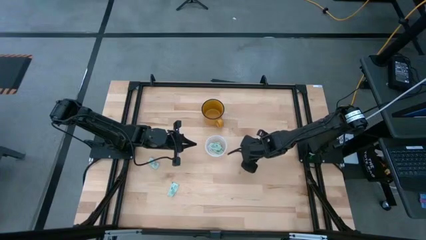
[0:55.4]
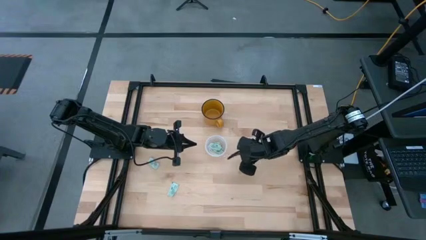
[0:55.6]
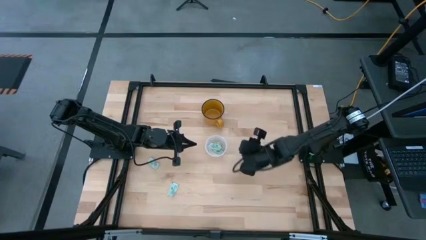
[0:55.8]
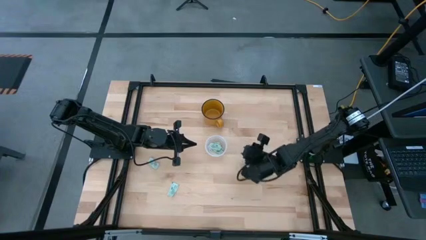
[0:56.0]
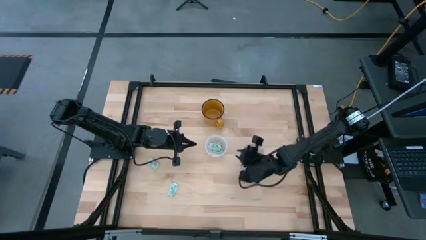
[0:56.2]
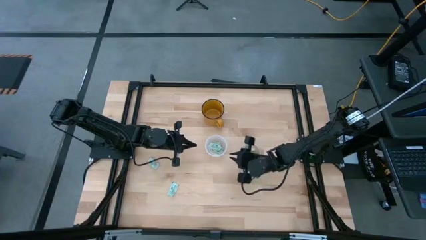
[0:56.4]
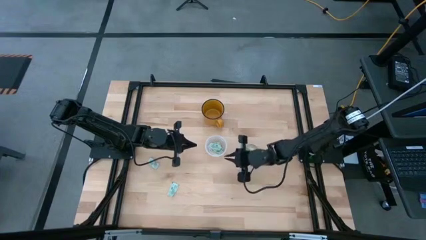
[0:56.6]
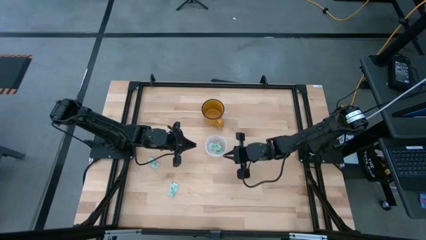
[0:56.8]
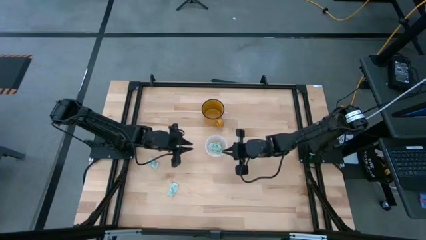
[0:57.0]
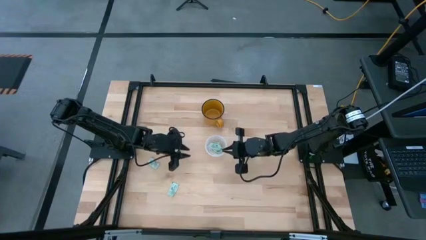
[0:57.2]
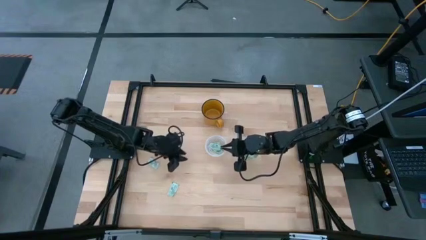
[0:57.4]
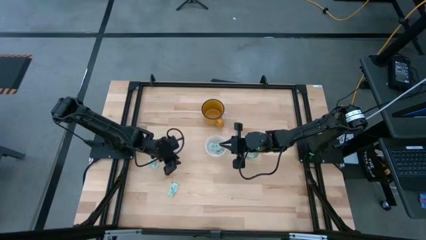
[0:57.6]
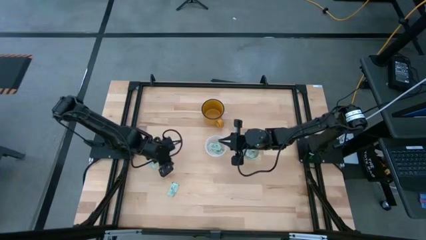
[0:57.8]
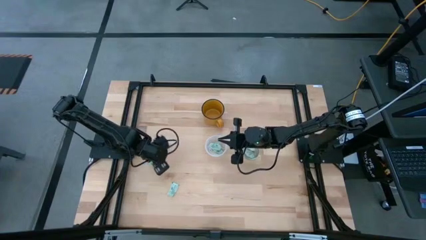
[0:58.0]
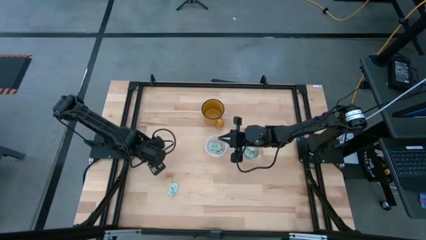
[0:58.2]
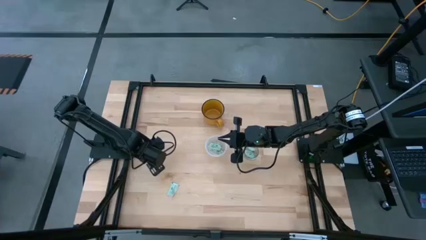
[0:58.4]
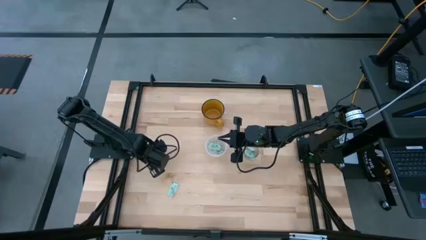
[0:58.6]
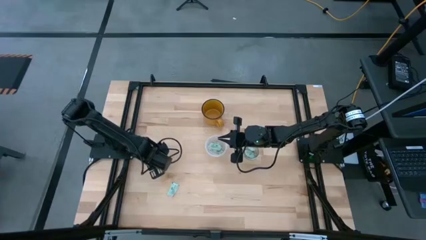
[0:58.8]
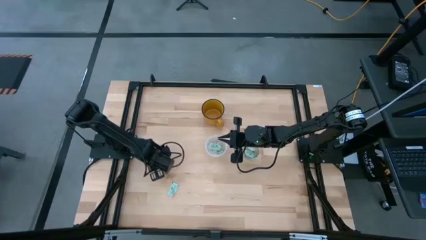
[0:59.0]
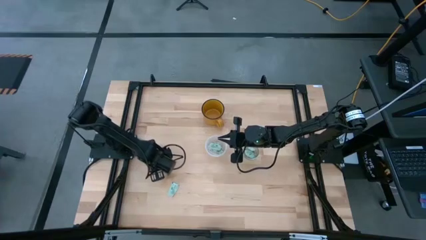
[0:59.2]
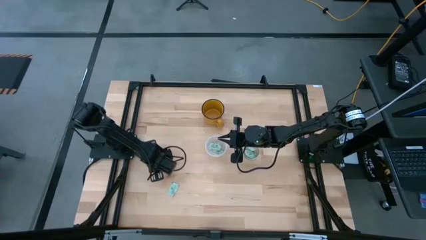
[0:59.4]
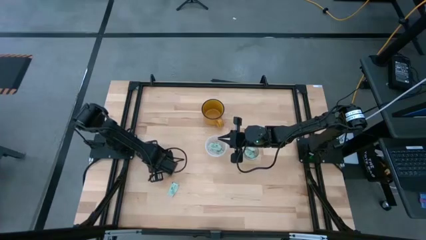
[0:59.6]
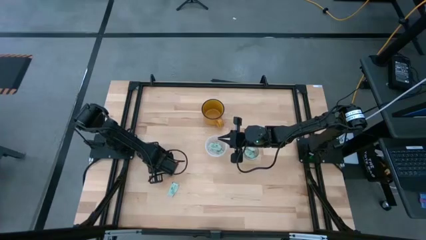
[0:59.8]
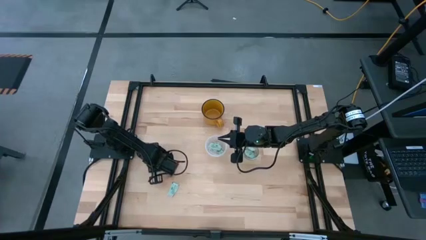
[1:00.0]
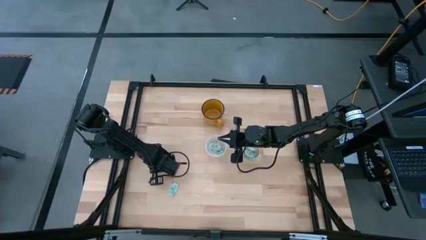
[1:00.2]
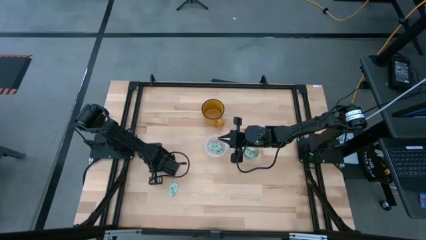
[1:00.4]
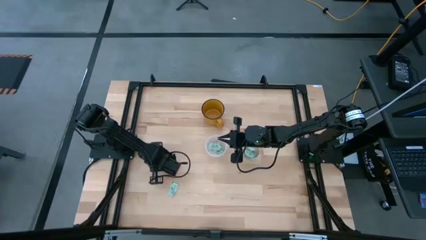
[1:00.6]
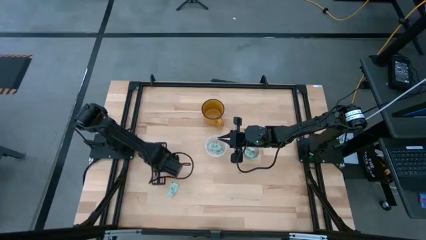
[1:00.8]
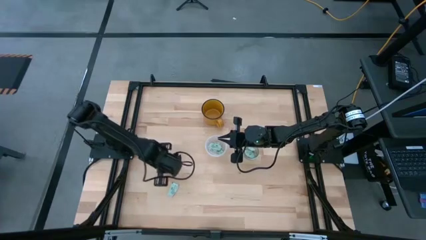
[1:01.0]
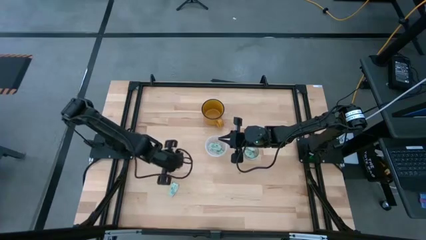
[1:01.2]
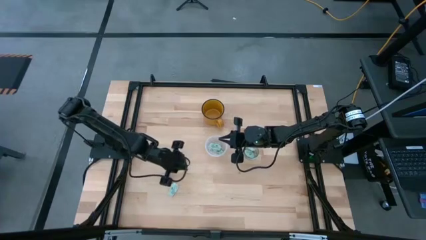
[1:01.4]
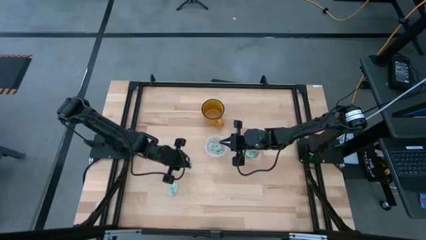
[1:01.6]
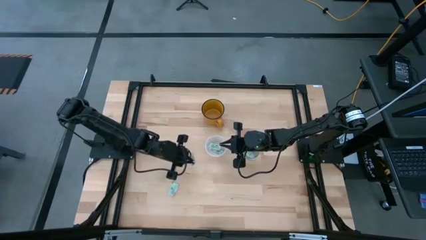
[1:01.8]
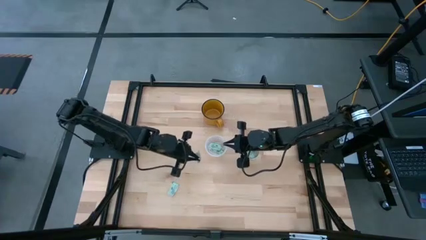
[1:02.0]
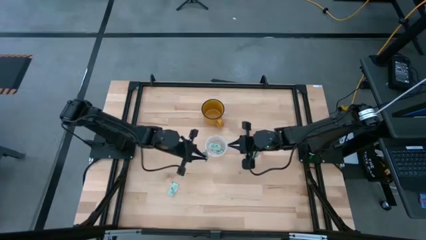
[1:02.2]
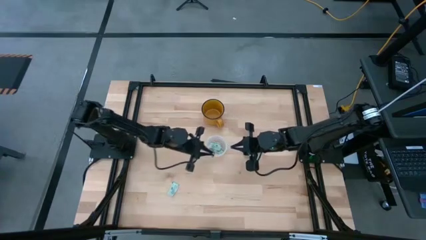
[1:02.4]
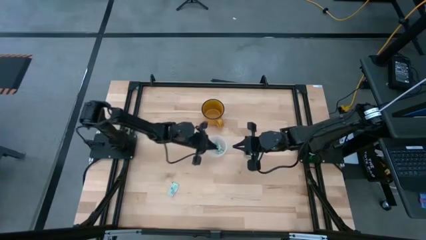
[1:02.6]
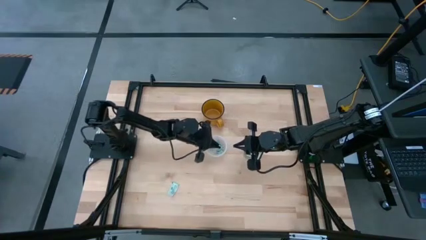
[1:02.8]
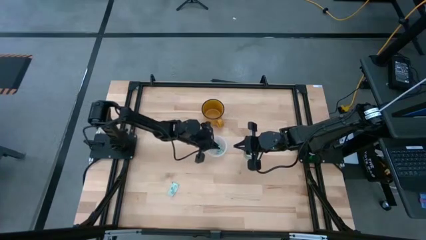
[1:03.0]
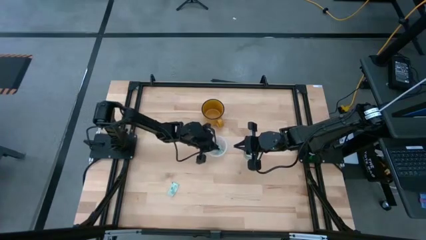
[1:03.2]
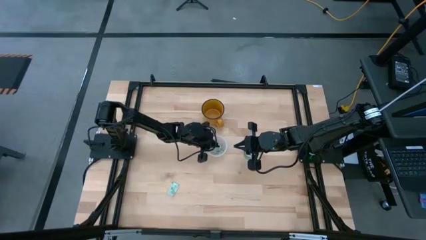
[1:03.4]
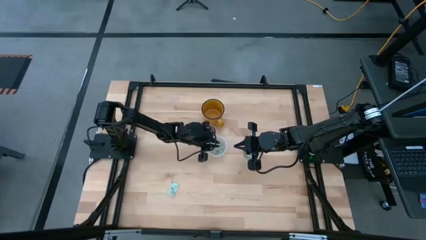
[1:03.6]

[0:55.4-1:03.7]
Task: Pick and place Stevia / Truvia into bins
Put the green stevia packet into the transparent container

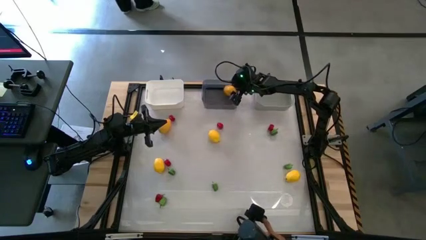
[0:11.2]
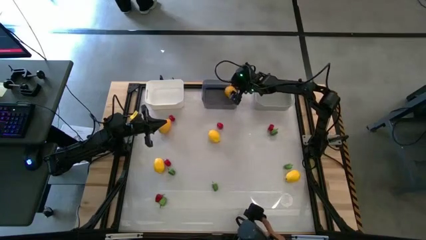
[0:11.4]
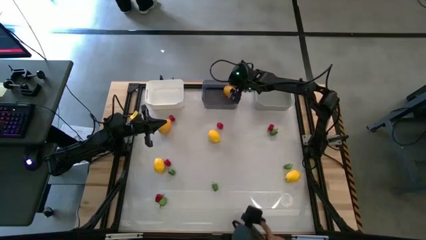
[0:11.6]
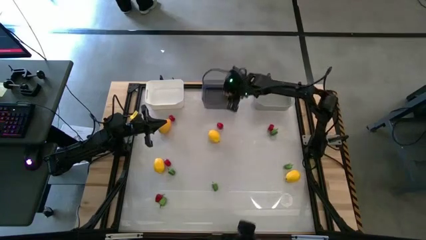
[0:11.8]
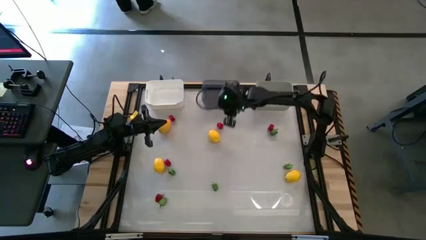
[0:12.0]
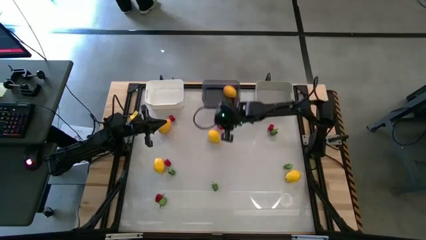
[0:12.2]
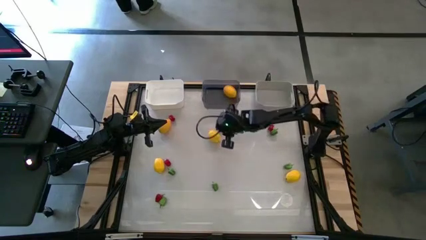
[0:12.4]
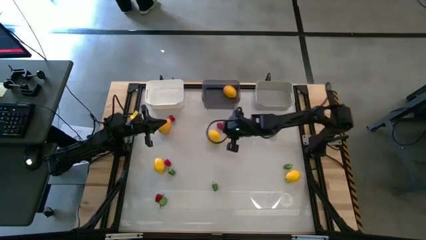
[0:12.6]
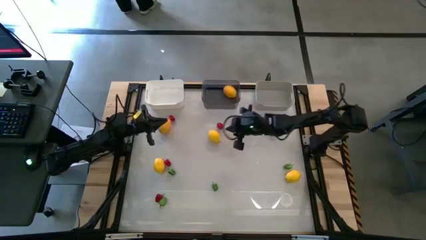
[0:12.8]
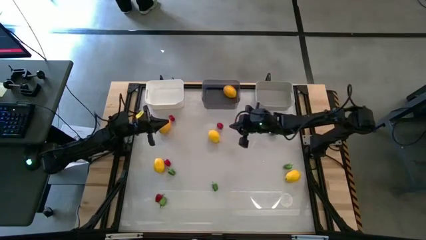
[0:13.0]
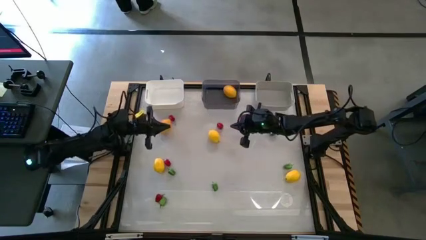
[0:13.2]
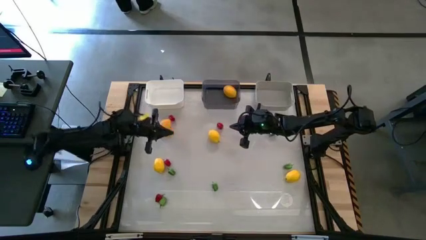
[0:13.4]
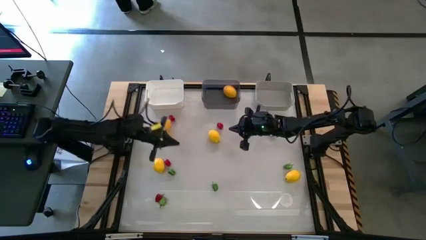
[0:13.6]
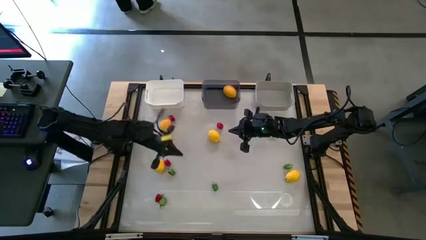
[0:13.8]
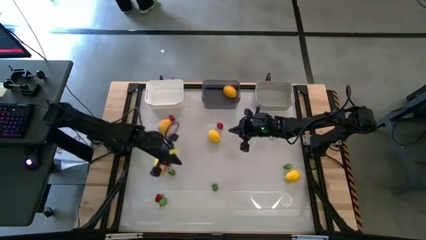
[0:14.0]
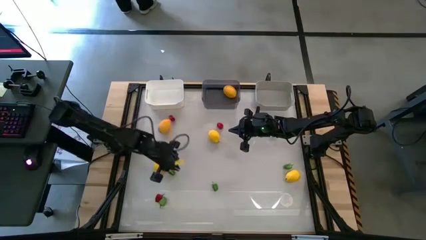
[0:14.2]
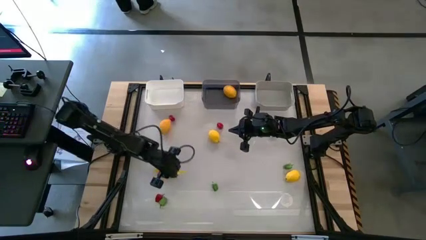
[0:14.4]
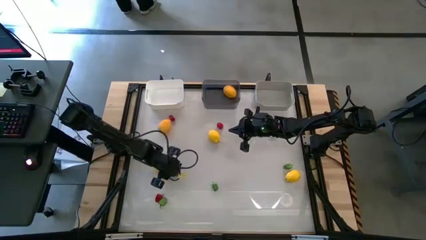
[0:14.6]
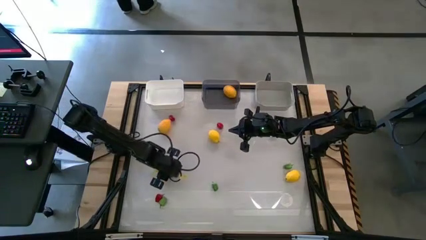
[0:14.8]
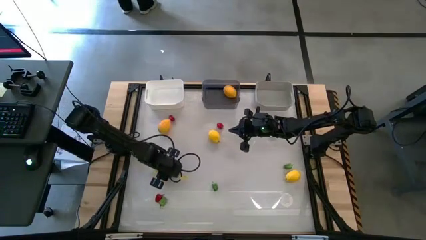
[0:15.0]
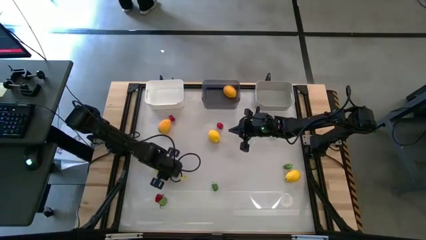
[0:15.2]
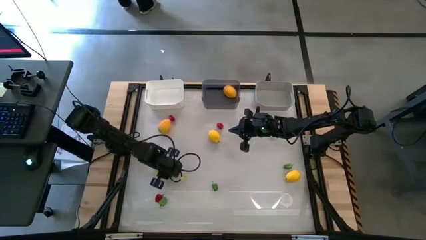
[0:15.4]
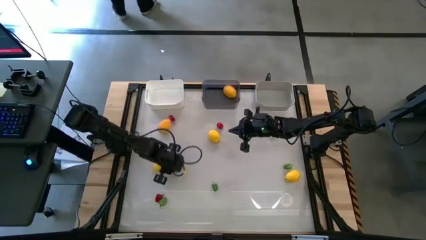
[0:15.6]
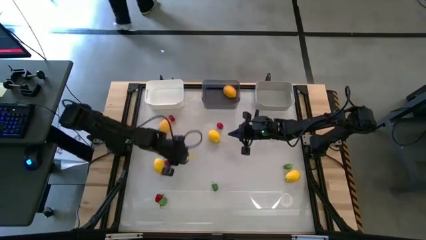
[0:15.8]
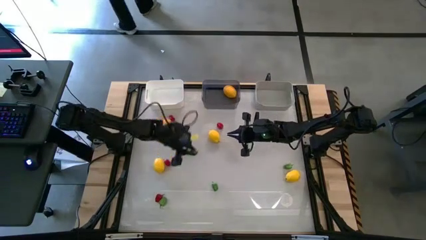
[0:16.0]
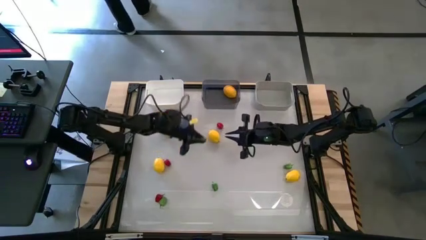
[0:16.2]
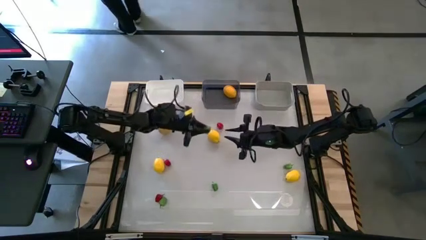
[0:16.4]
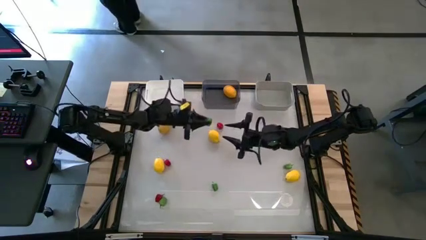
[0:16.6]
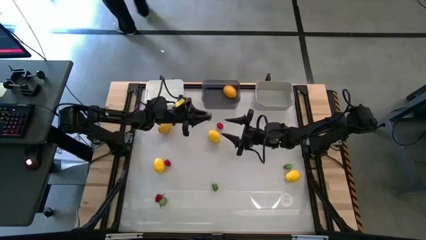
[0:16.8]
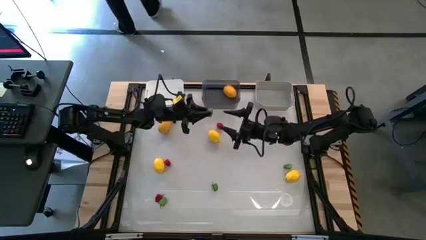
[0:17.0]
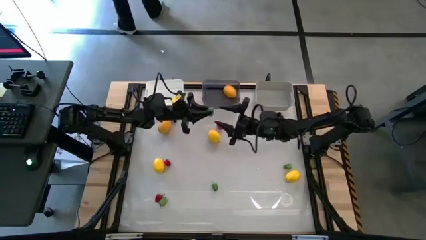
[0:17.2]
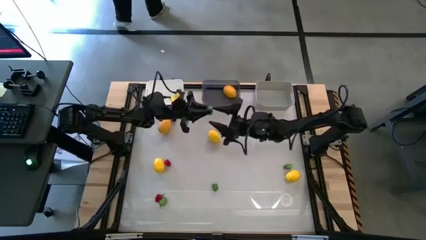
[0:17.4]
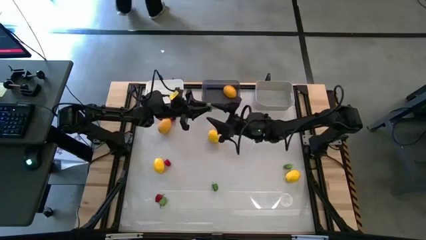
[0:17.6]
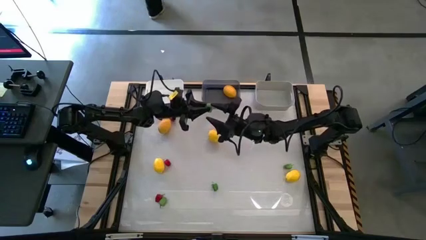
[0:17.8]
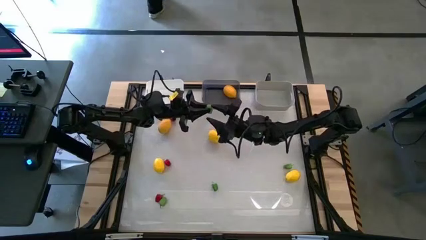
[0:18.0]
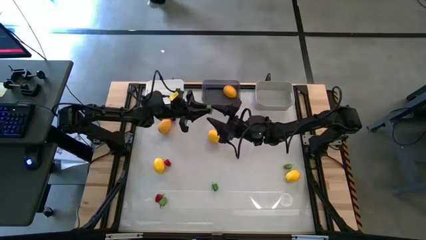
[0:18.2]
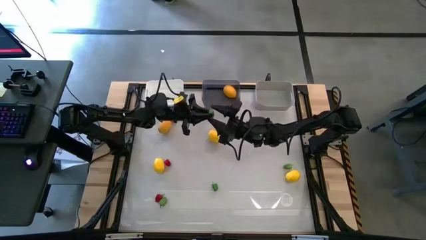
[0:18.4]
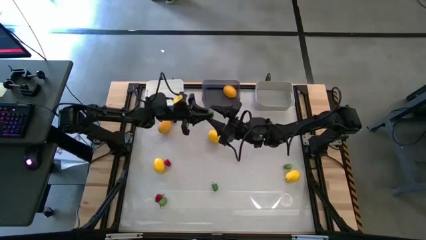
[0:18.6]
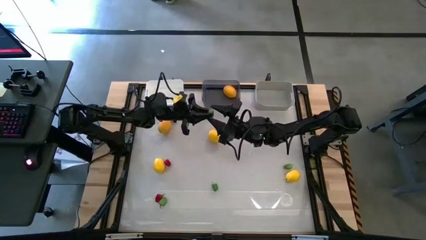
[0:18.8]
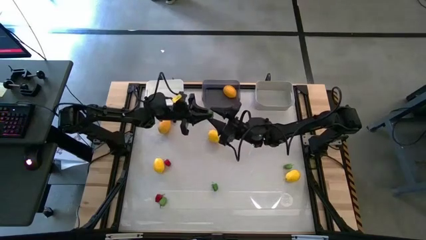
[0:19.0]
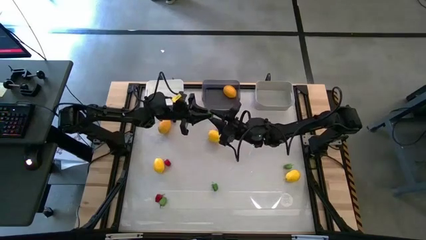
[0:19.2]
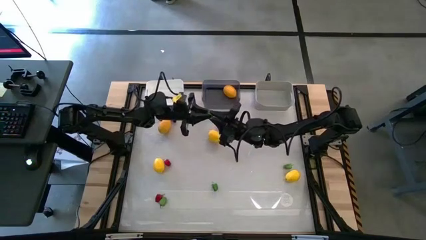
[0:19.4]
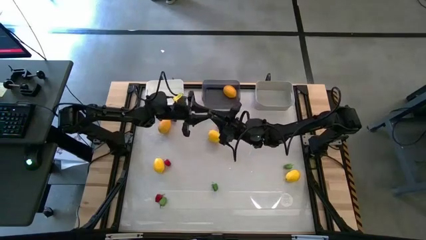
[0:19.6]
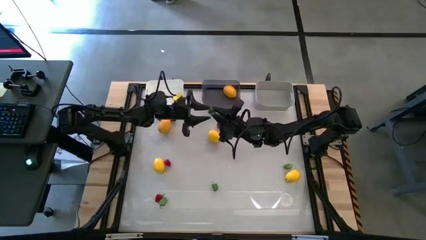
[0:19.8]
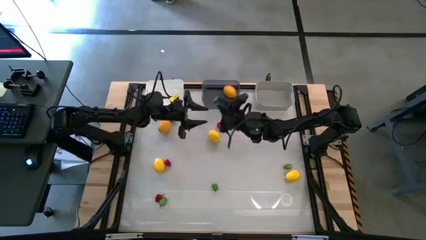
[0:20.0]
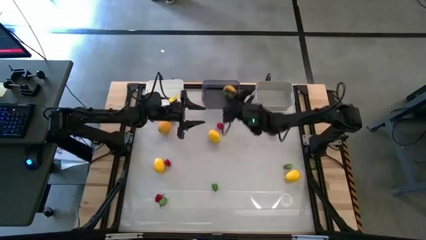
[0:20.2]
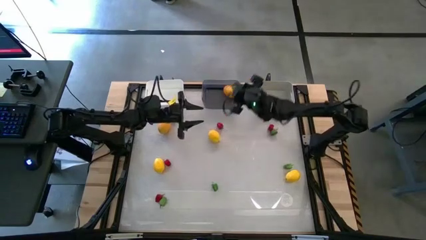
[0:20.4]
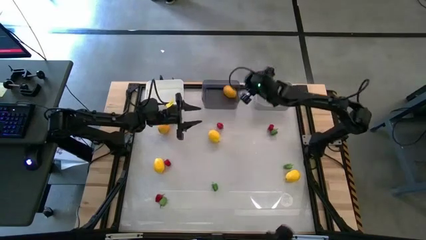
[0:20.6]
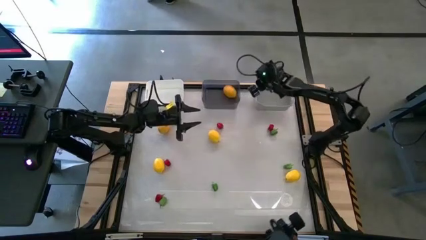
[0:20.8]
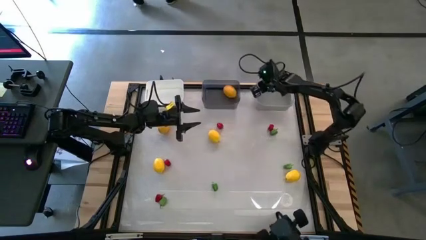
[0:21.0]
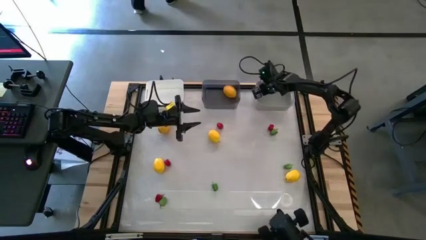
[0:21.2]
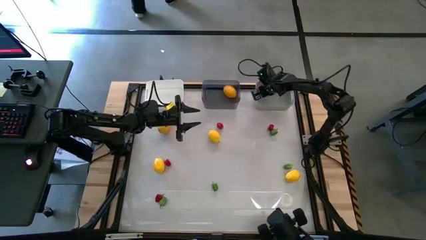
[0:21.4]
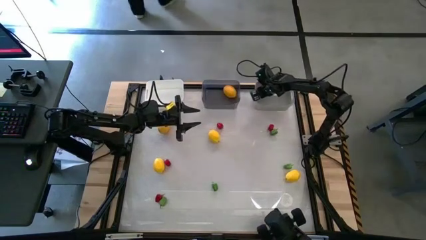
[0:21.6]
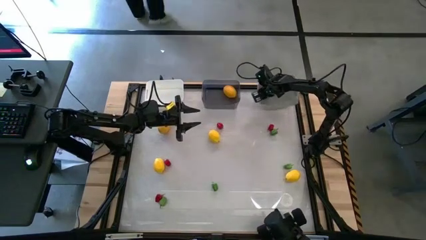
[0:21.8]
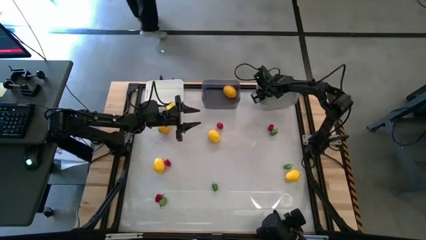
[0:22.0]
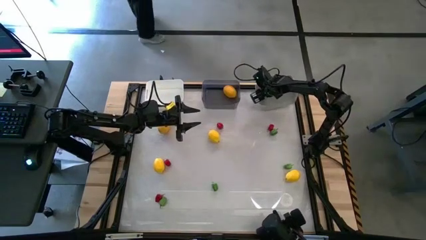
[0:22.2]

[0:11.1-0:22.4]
Task: Sort produce into baskets
Put the green bell pepper into the gray bin
